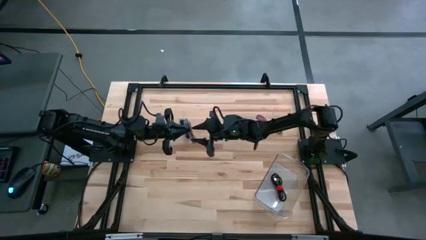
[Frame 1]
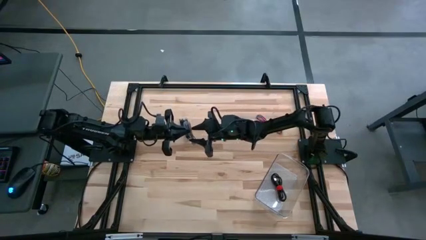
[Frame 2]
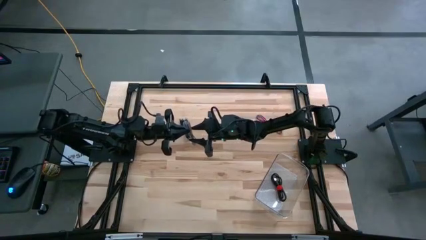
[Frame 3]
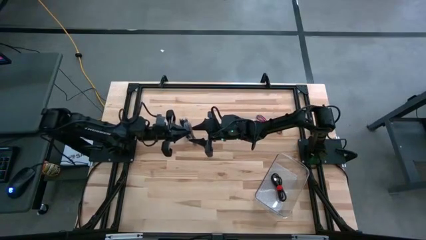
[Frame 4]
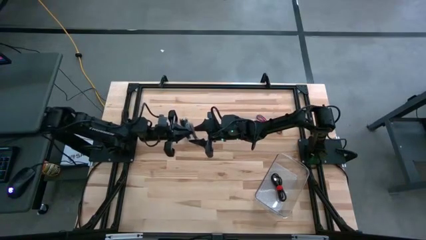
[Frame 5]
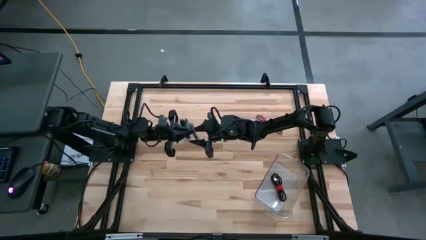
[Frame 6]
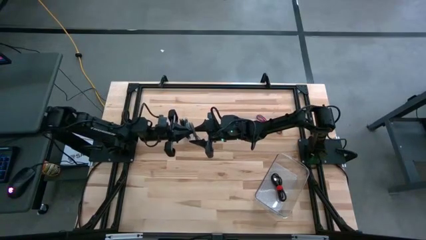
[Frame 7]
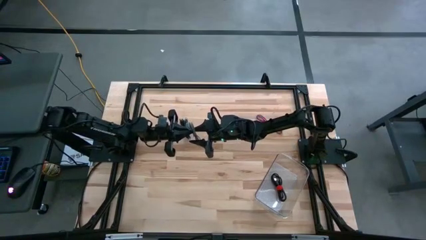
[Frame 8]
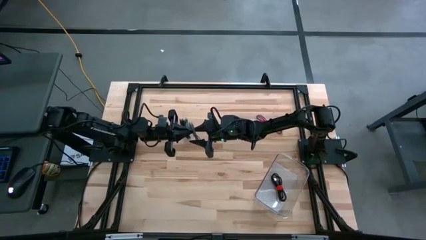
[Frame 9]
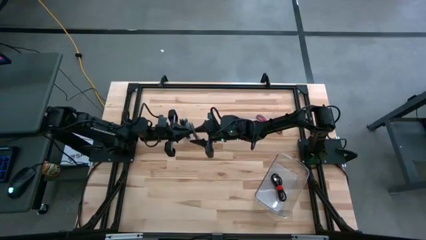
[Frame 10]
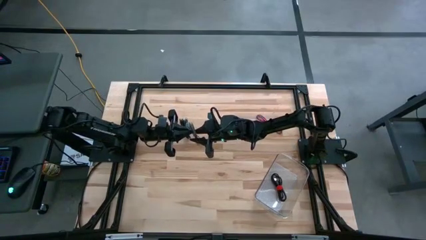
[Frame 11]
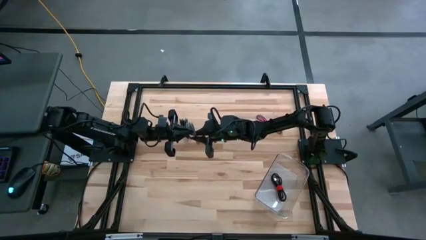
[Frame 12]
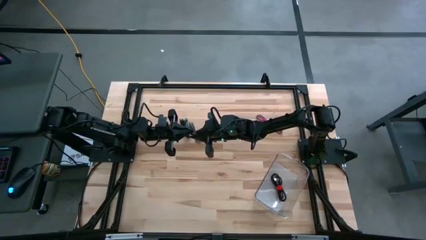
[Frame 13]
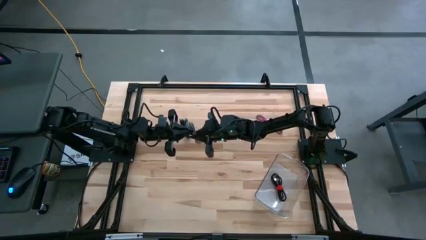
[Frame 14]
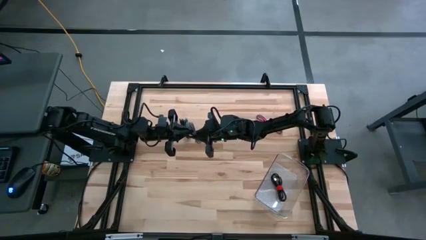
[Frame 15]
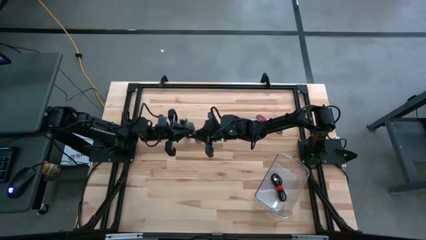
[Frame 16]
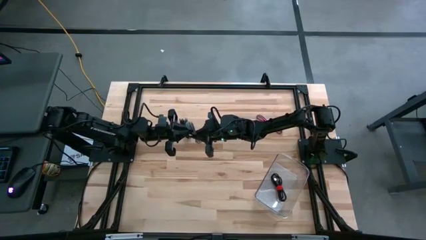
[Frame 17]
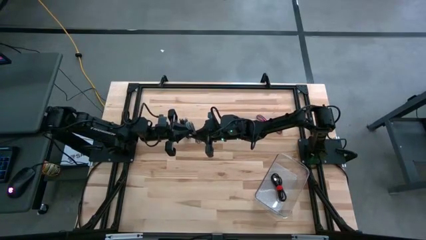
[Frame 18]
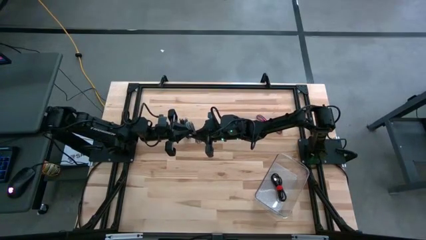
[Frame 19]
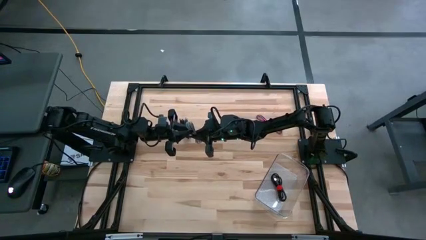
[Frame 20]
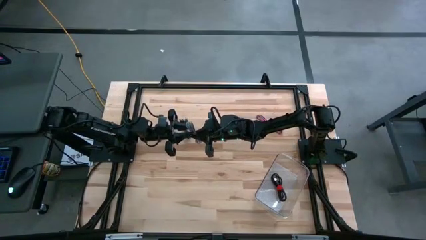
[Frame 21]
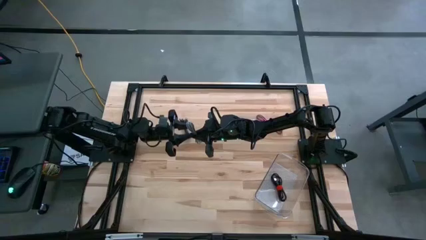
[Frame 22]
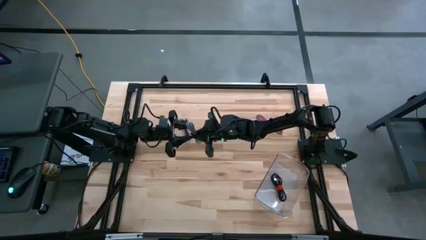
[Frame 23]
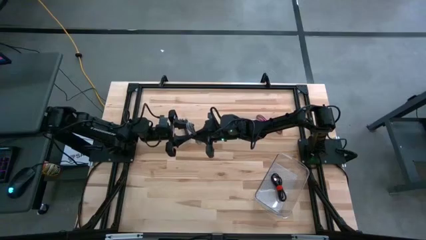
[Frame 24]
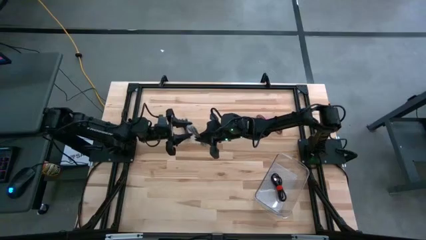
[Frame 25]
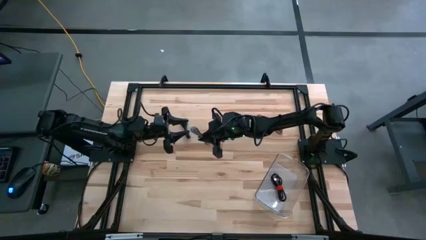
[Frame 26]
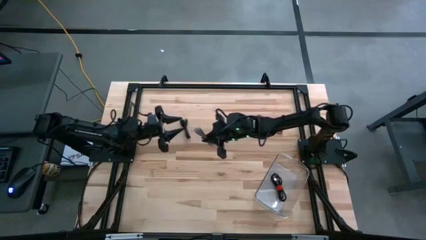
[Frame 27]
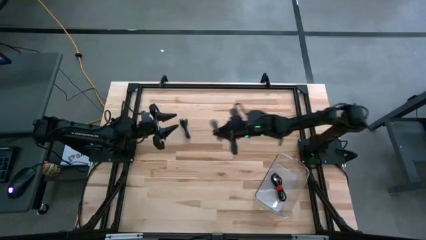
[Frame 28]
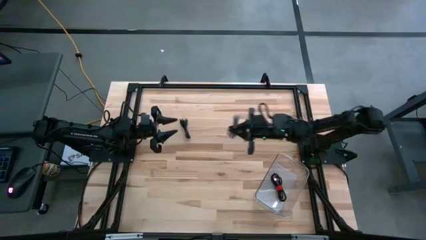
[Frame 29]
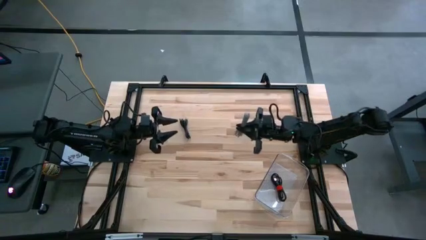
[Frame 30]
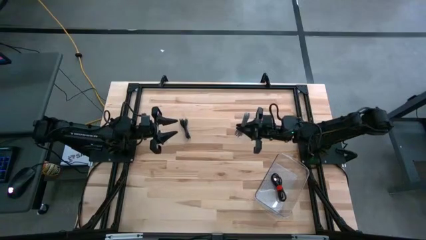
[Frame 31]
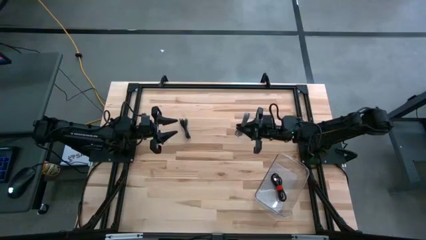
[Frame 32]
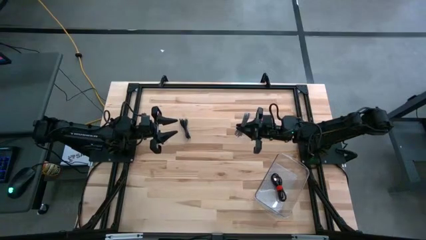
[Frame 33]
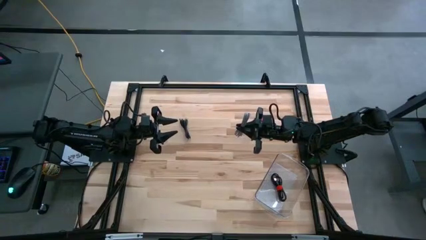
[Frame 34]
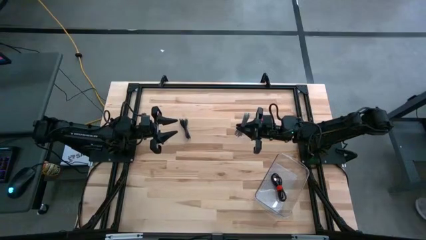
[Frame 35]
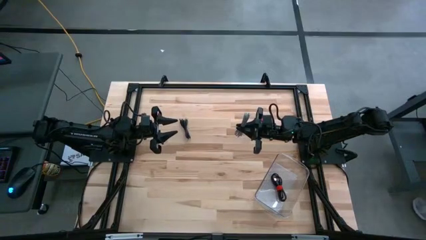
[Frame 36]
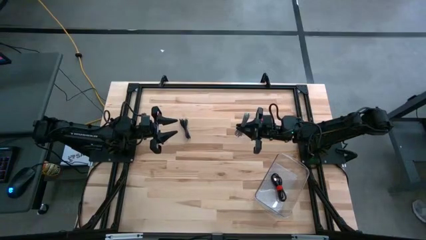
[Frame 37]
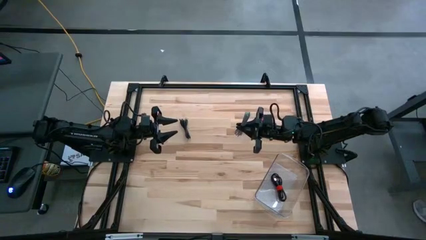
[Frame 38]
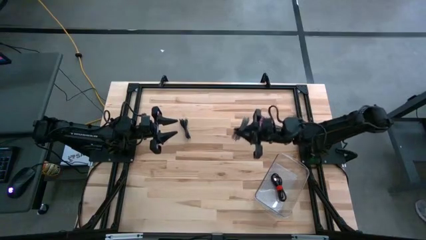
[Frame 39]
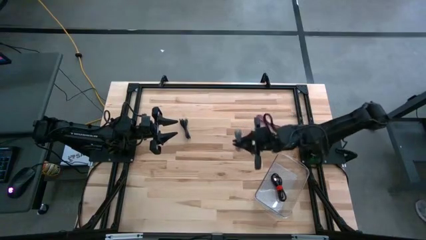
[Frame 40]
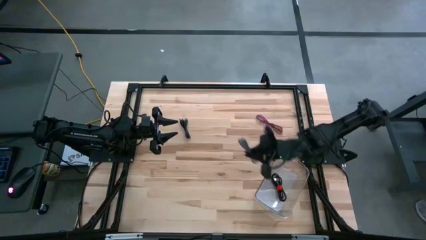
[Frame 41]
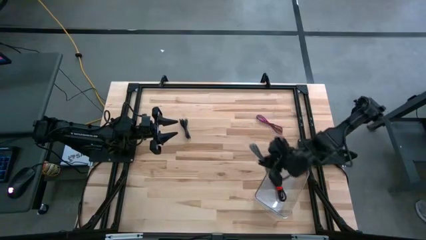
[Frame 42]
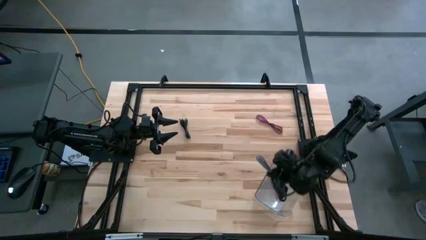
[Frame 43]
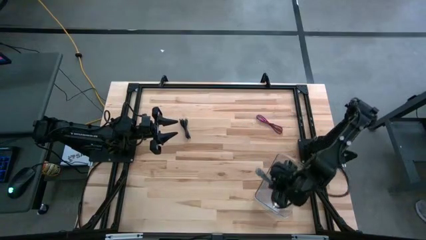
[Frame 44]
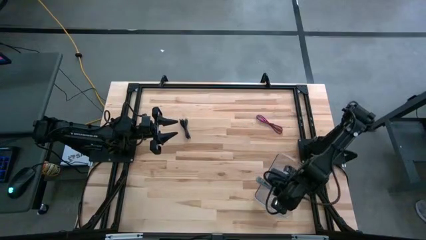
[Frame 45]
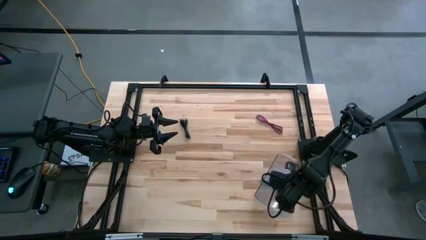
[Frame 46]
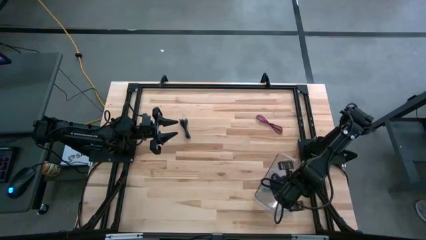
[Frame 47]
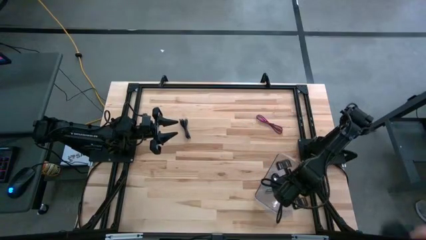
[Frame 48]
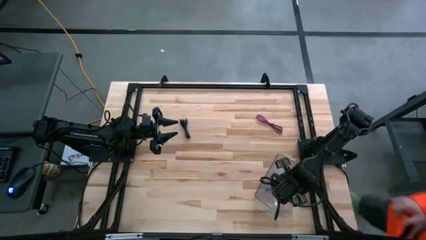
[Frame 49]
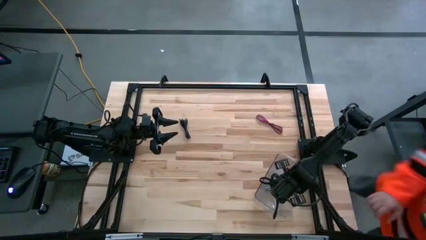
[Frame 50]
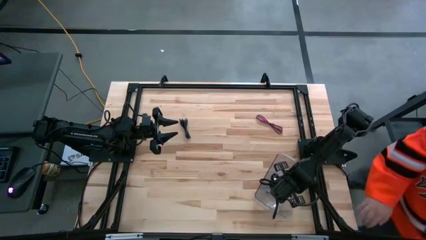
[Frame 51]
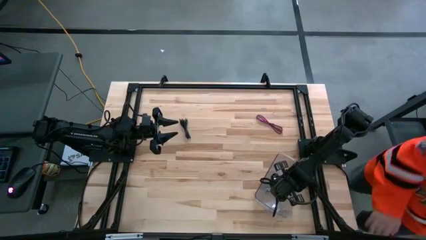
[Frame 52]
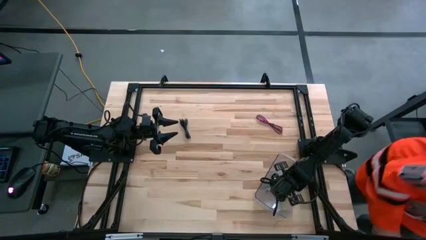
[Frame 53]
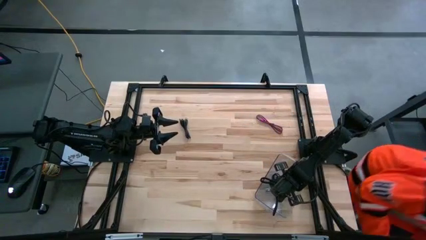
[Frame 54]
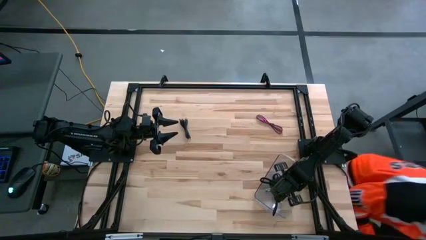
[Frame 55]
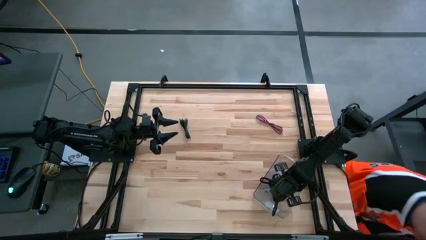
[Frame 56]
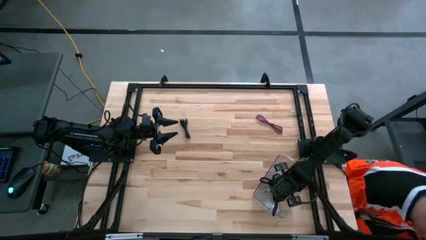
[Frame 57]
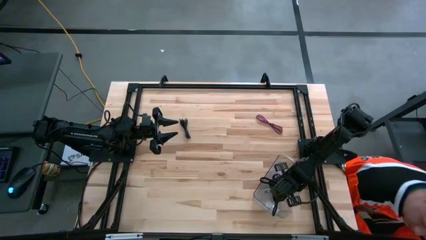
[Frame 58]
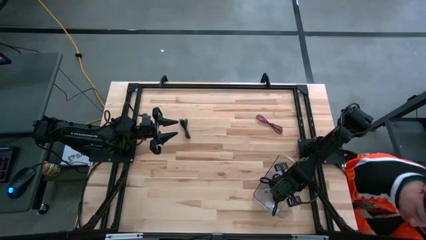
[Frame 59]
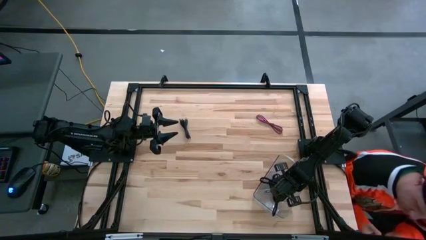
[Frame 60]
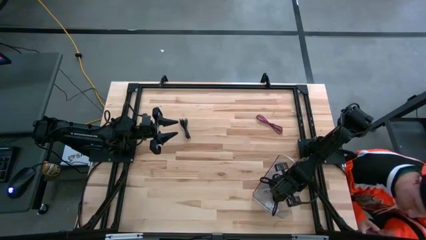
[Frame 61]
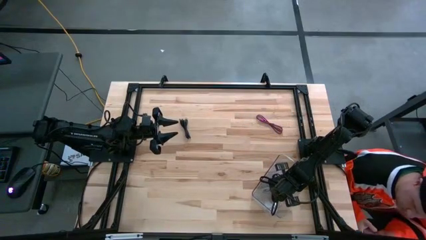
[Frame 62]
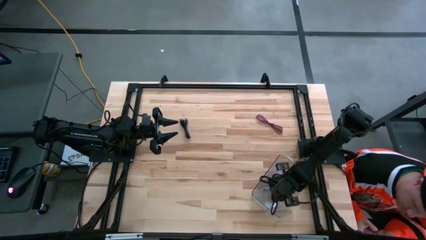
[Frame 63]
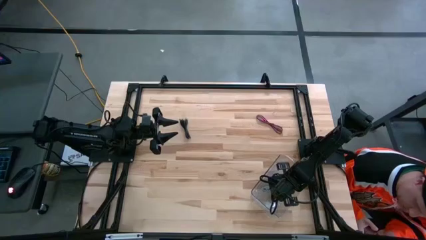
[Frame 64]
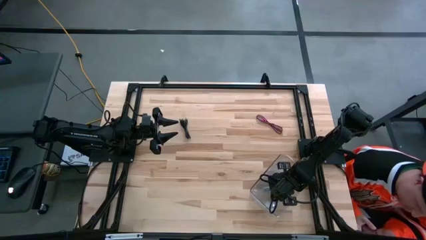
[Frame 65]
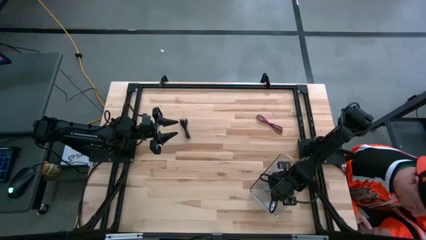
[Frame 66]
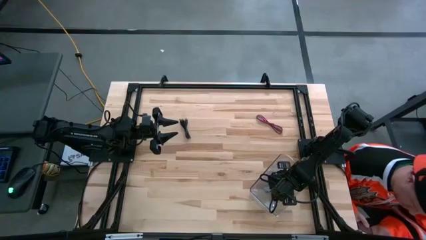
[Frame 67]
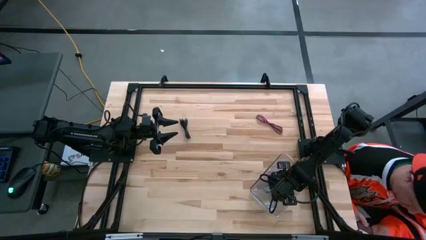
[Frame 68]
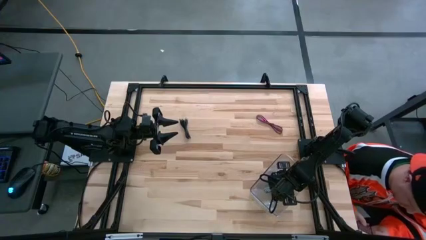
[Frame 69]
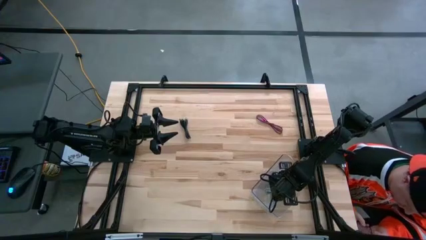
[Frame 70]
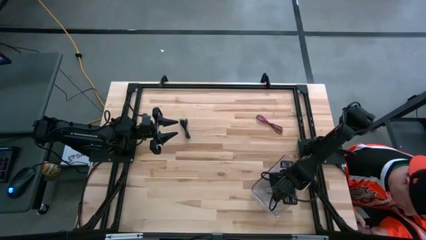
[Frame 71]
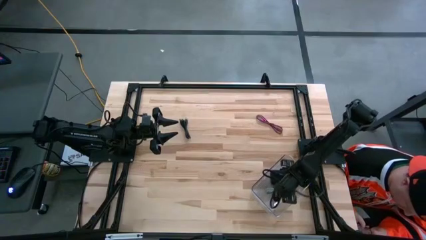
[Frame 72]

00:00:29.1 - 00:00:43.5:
Task: Pick and place USB-C Cables
Put the gray charger cable into the transparent bin
